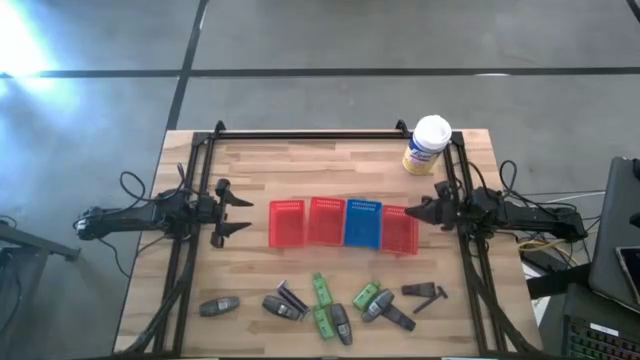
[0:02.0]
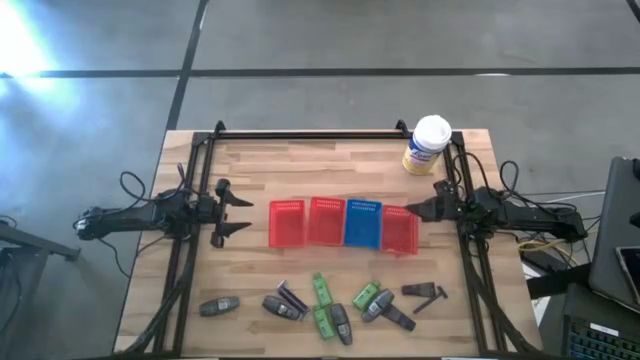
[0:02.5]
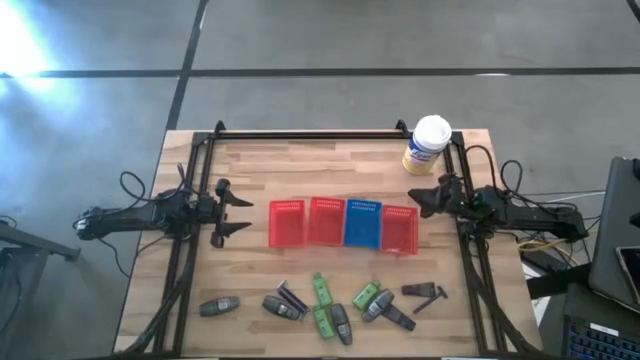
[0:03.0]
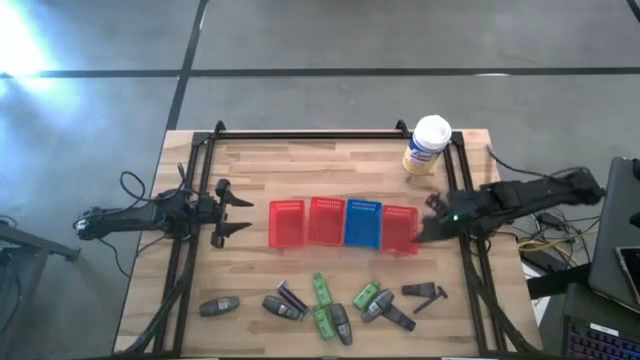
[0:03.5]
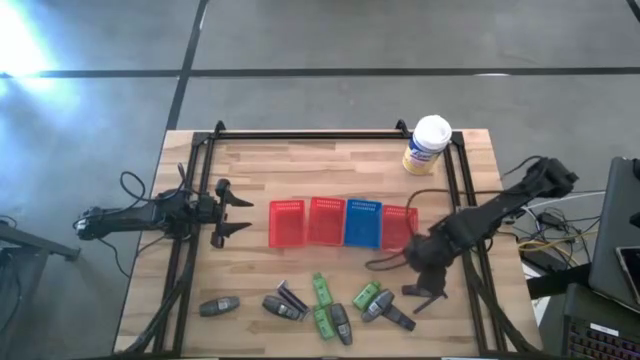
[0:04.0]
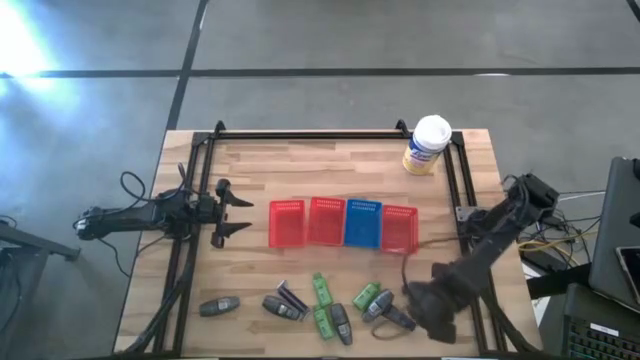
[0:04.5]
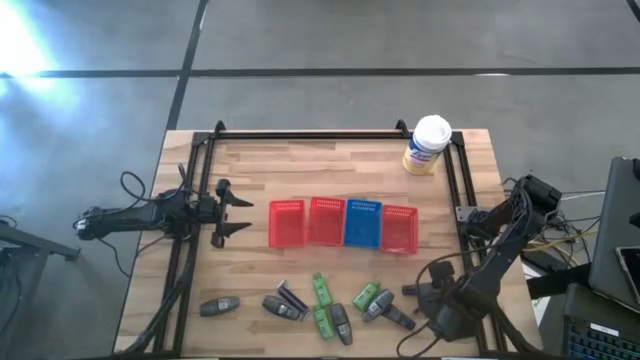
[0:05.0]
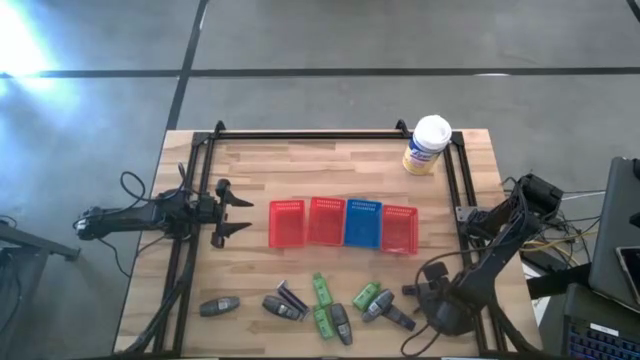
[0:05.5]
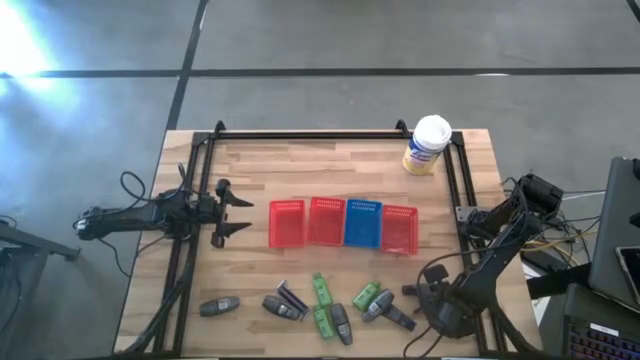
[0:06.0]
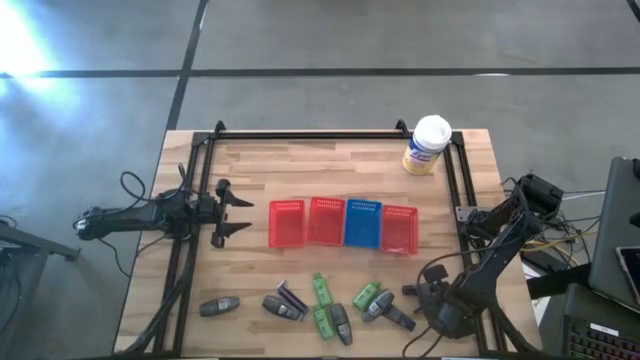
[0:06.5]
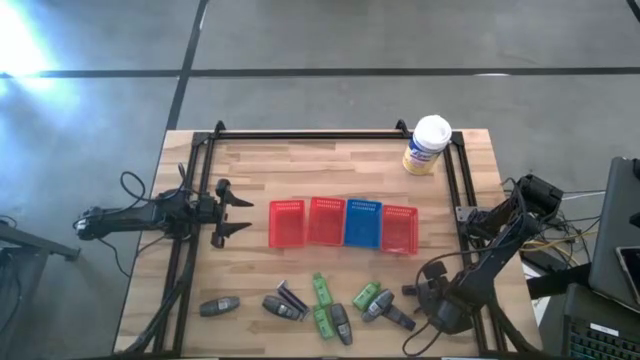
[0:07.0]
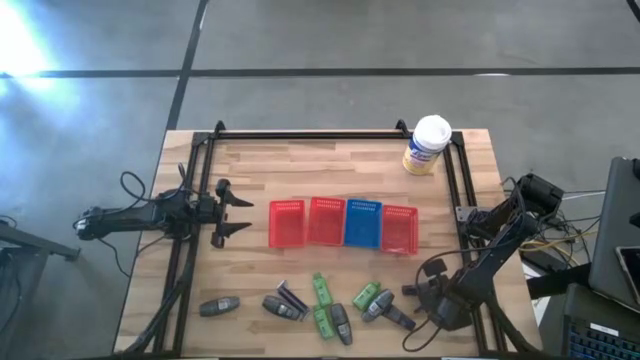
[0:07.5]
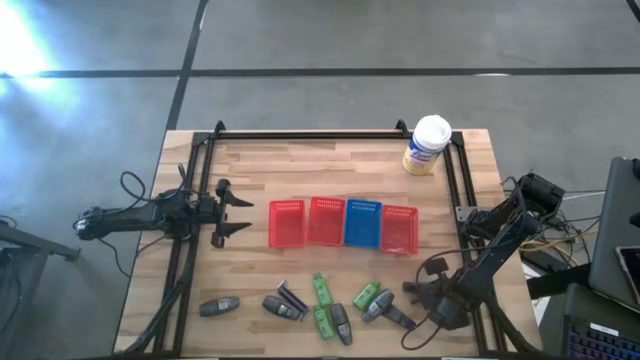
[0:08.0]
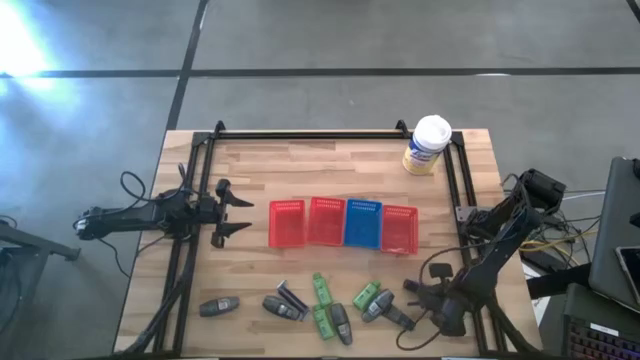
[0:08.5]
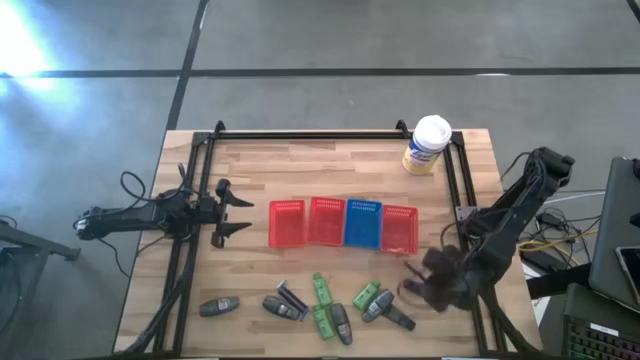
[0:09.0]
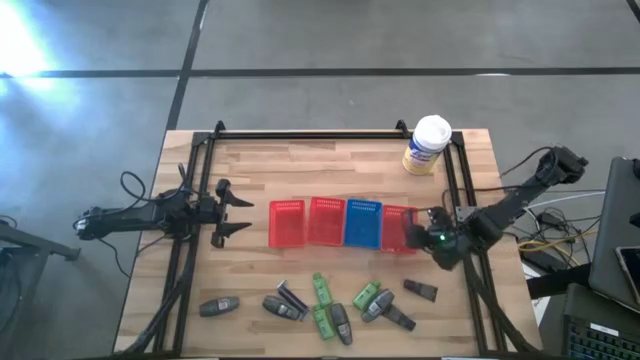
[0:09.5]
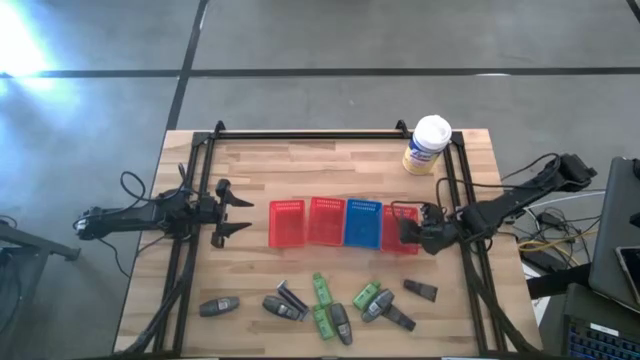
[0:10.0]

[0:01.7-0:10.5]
Task: Pick & Place Travel size toiletries
Put the blue razor into the right orange basket

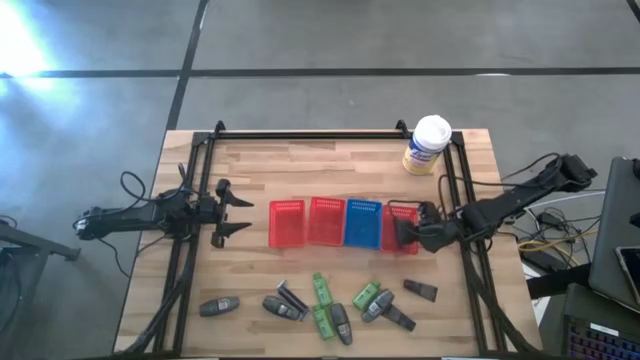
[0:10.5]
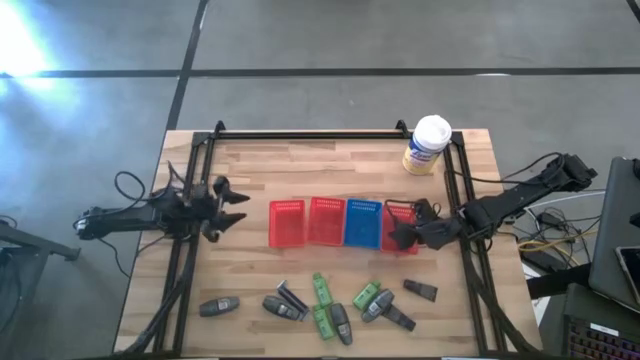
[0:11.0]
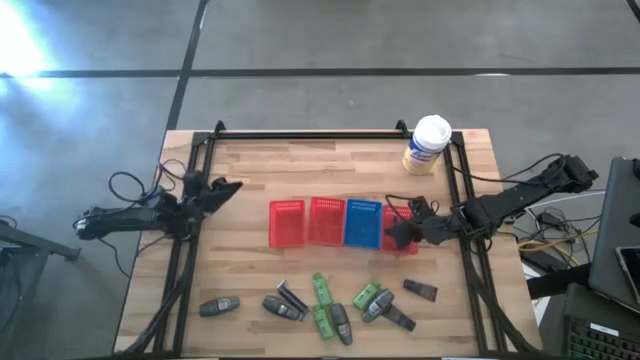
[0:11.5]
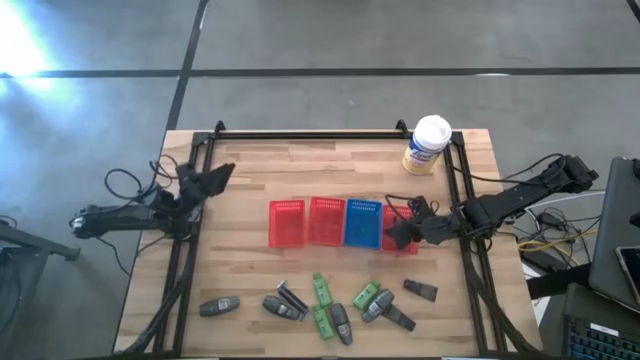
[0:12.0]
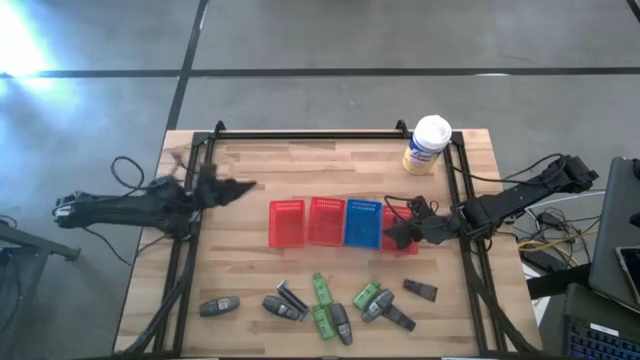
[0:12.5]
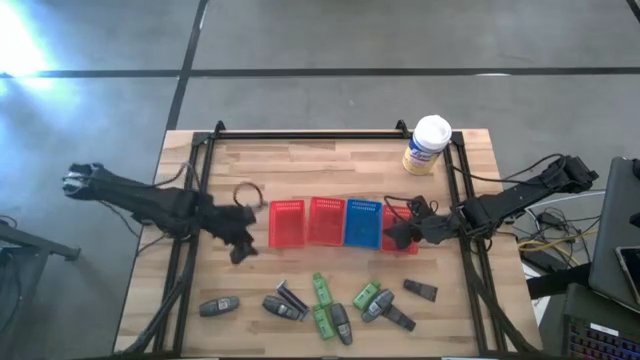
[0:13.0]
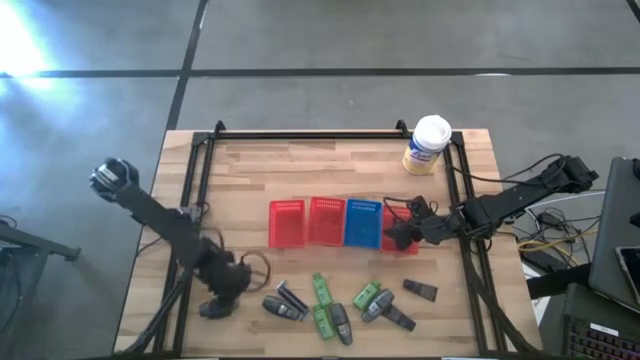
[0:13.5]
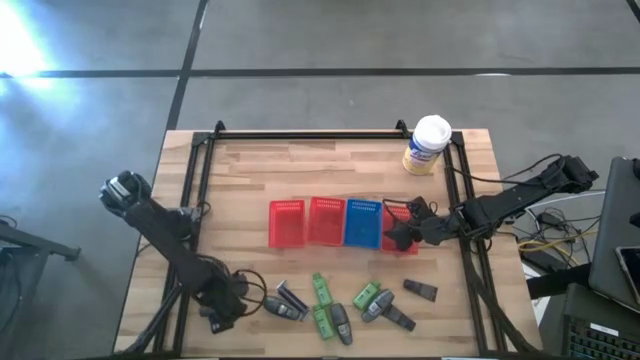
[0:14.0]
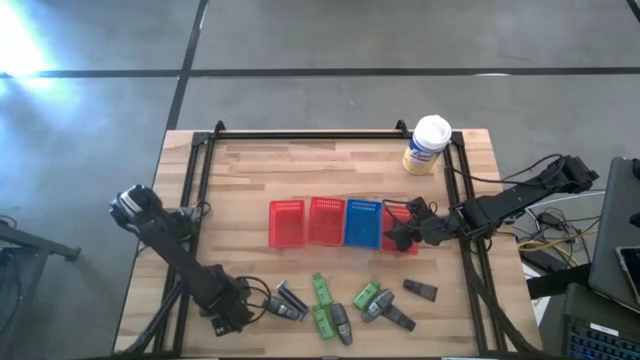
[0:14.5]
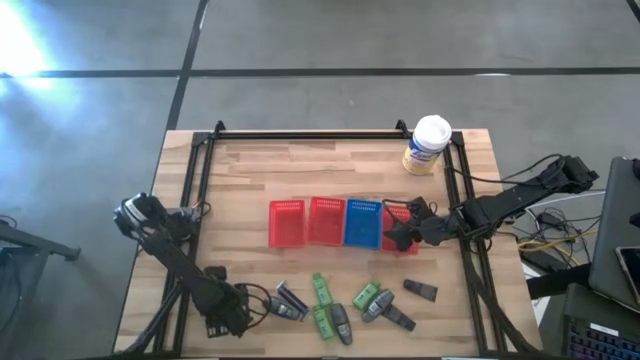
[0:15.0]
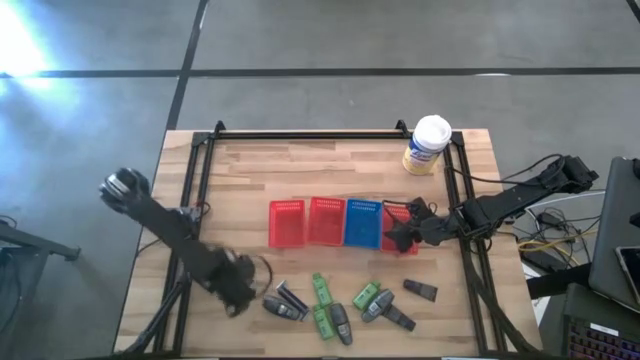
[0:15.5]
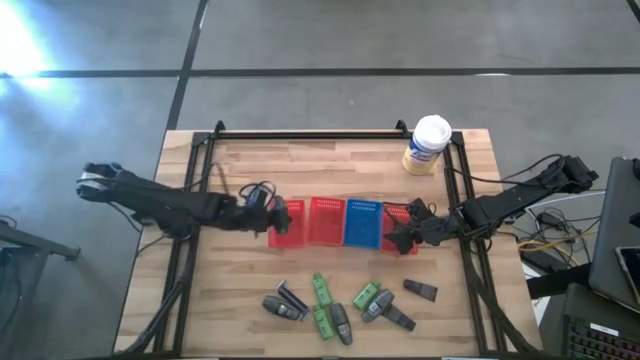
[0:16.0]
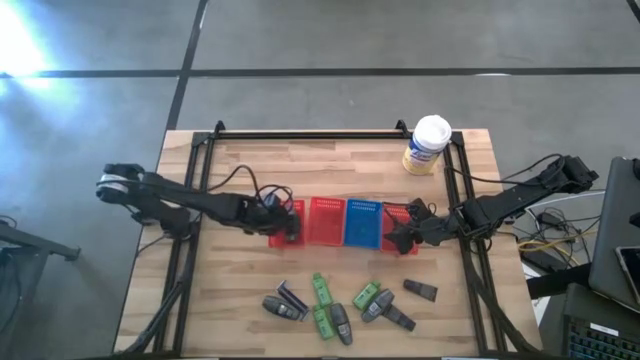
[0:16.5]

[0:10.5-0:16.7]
Put the gray deodorant into the left orange basket

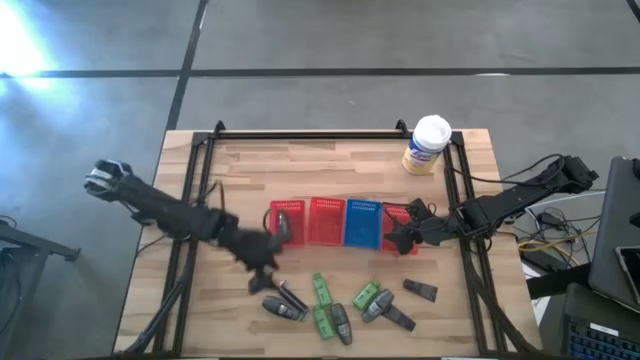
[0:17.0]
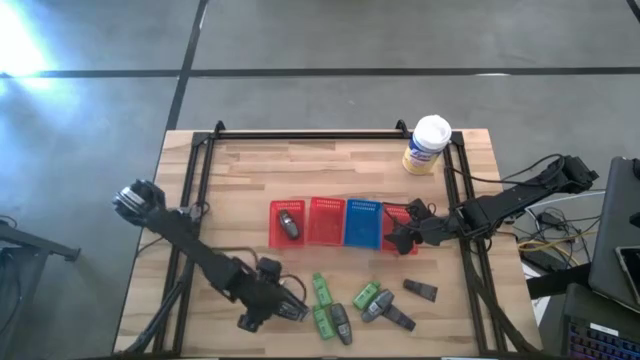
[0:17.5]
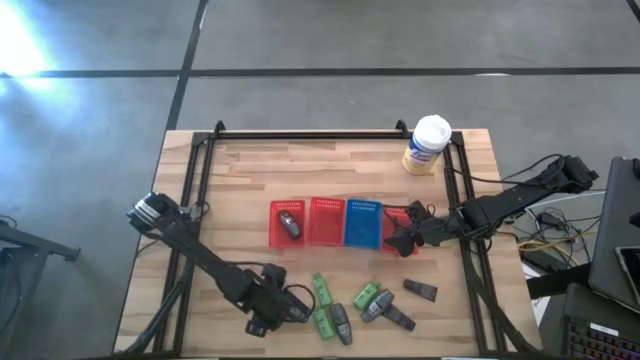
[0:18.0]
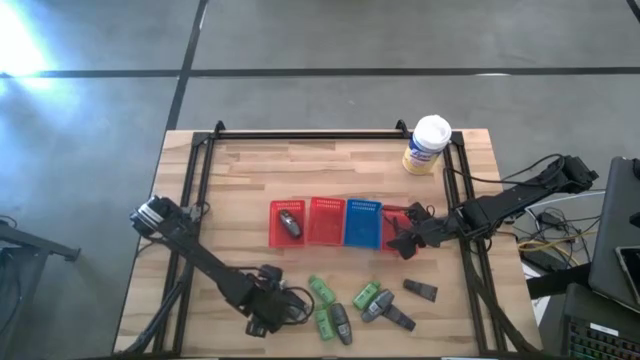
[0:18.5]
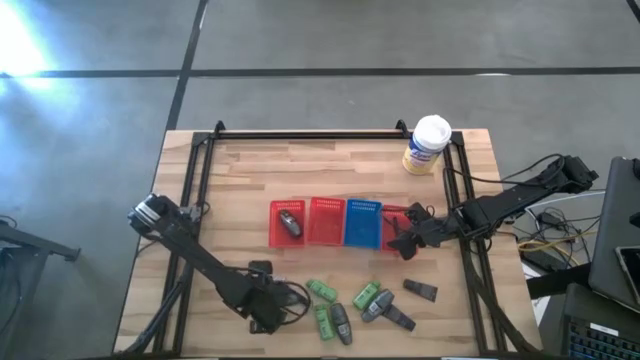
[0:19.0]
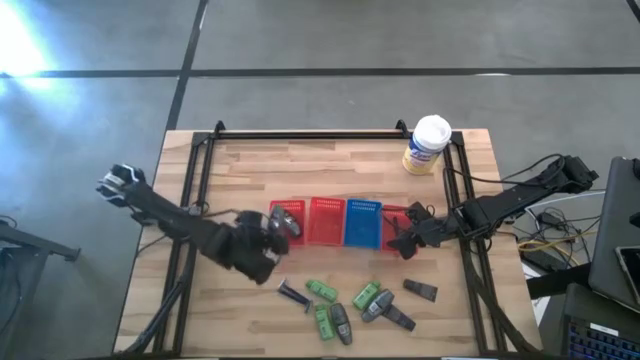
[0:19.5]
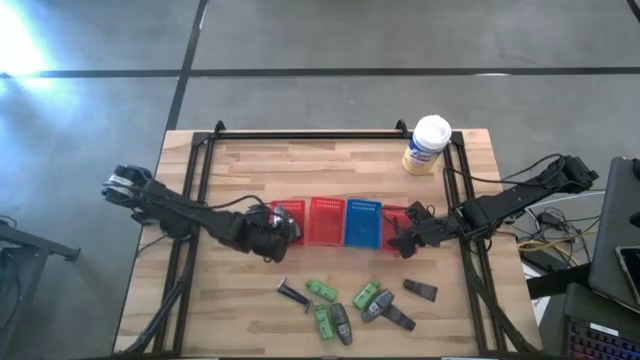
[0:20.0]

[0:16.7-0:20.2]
Put the gray deodorant into the left orange basket

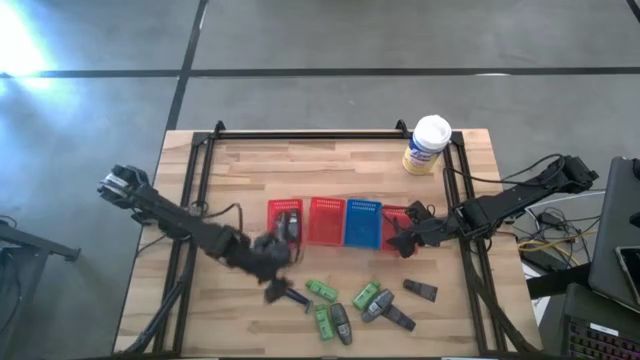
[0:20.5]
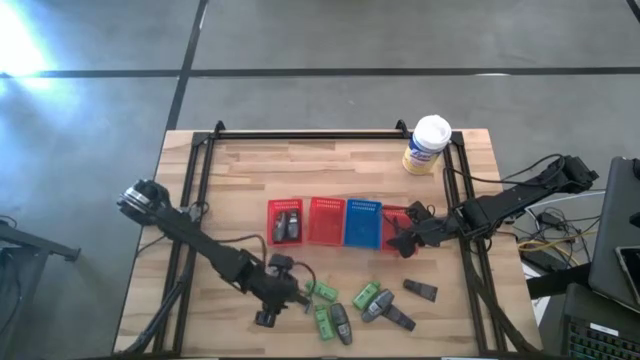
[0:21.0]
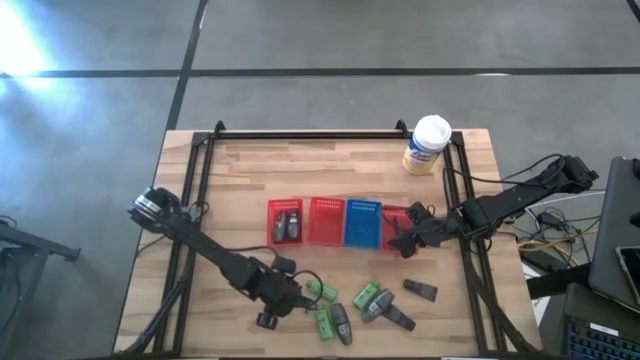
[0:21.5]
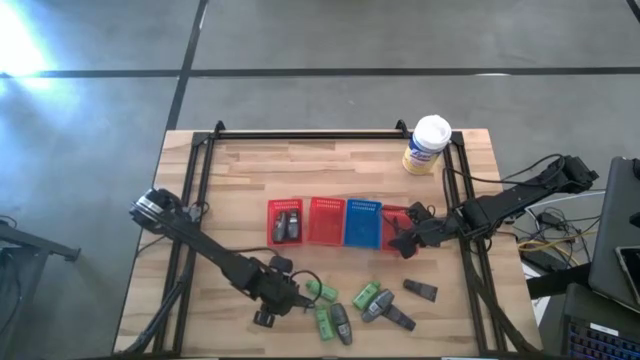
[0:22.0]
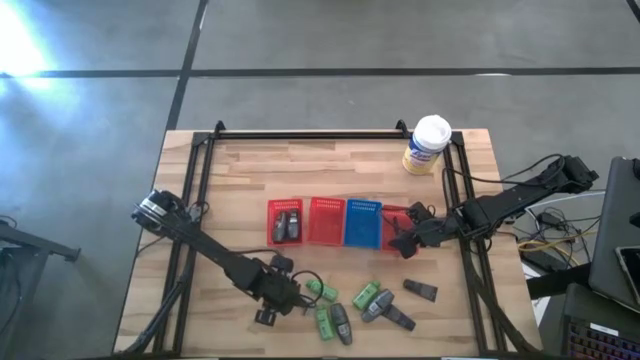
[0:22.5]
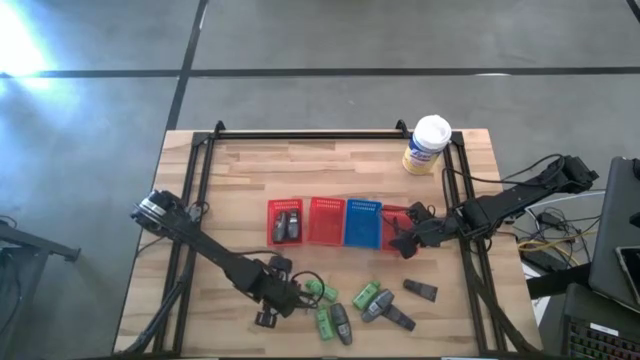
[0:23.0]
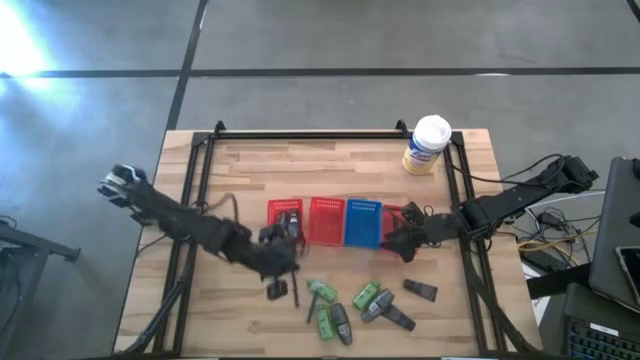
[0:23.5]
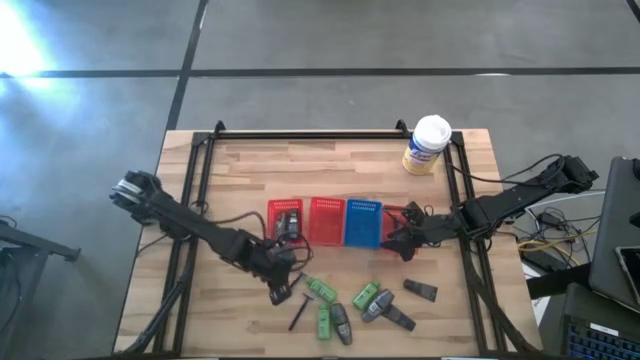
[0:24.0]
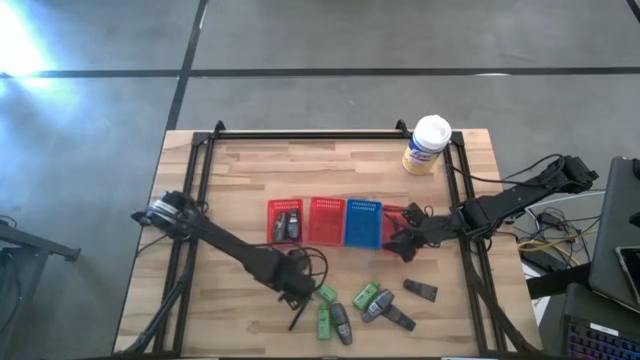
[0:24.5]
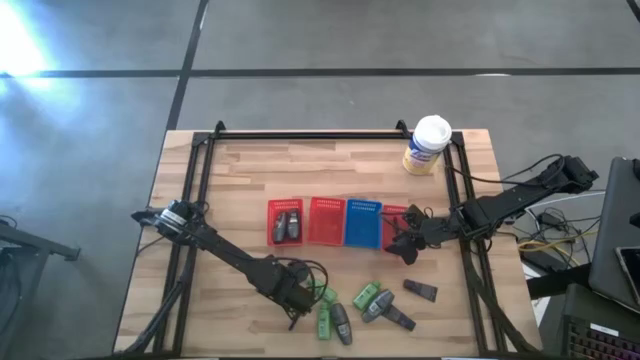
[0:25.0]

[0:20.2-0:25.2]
Put the blue razor into the right orange basket
